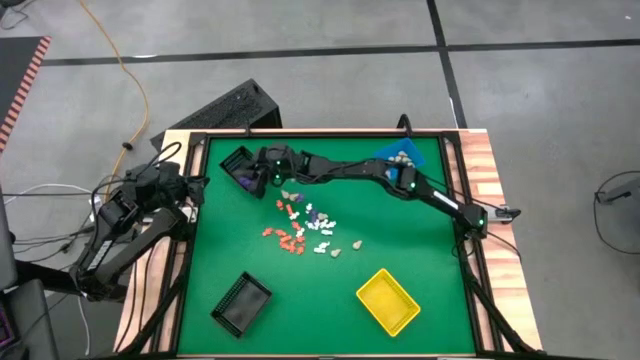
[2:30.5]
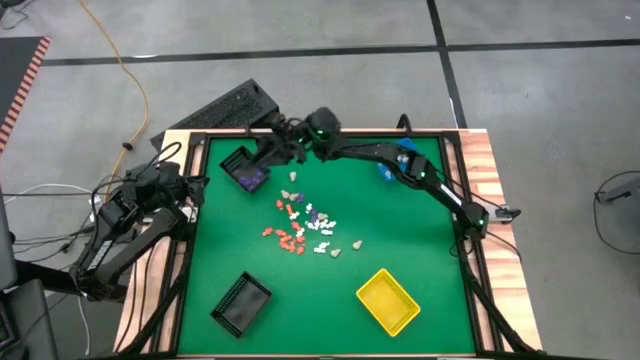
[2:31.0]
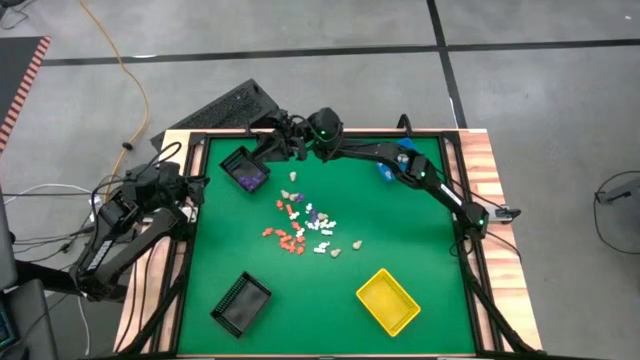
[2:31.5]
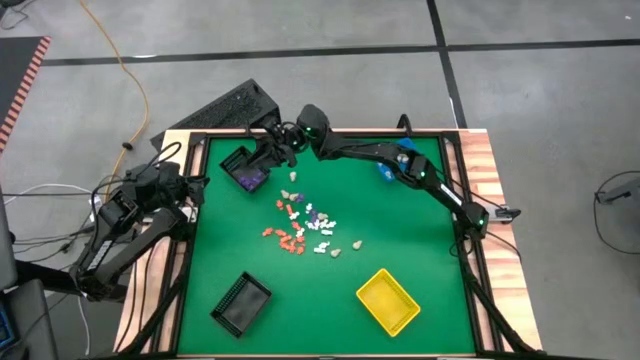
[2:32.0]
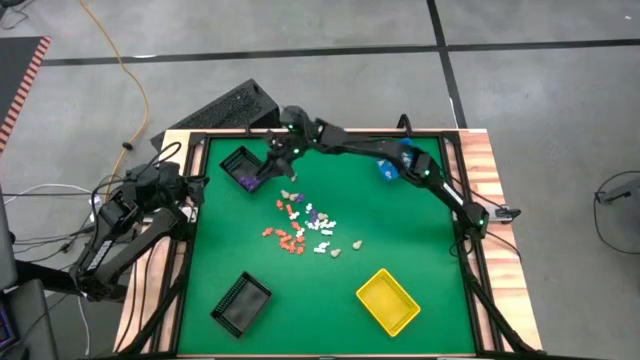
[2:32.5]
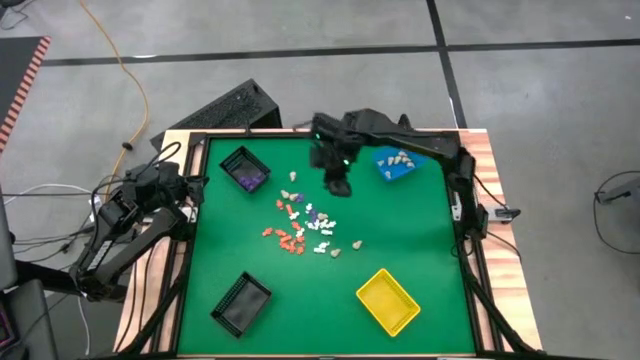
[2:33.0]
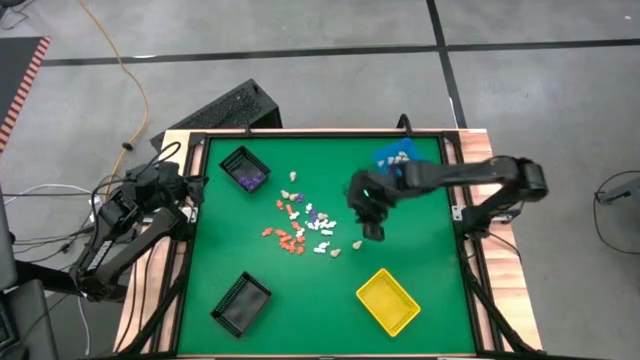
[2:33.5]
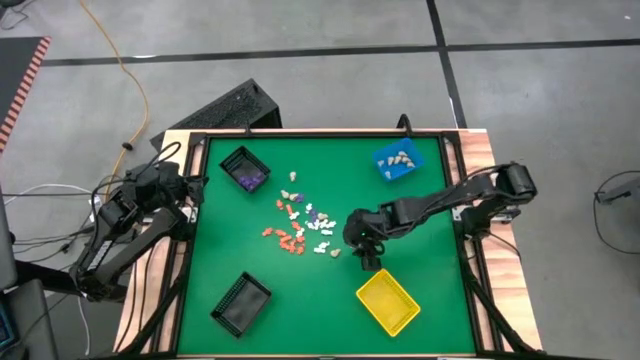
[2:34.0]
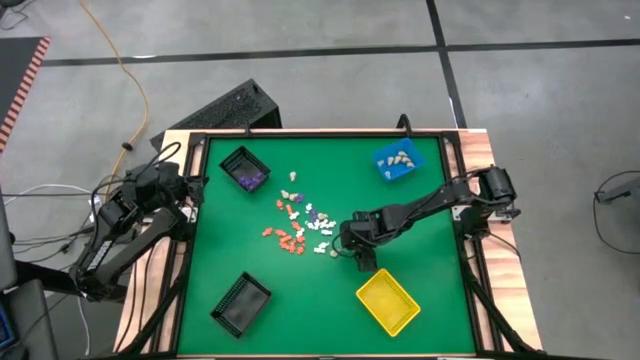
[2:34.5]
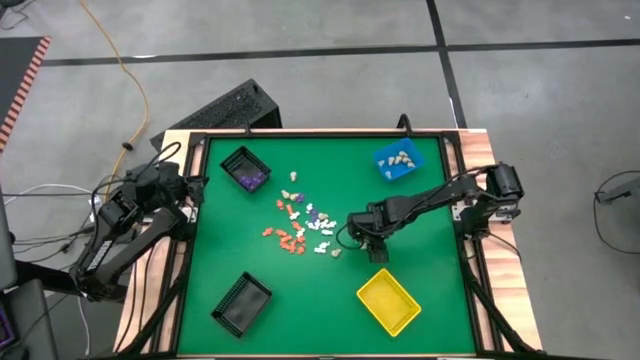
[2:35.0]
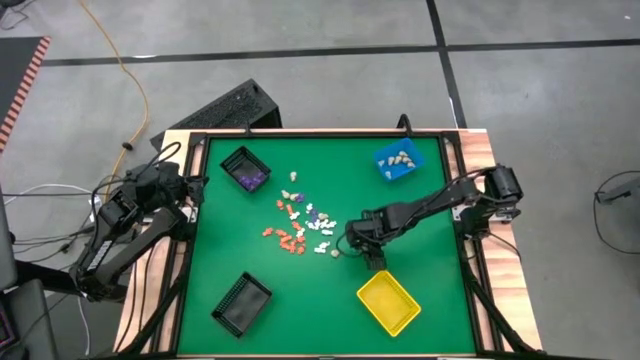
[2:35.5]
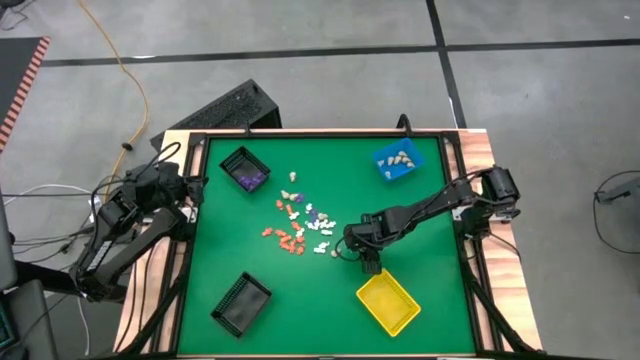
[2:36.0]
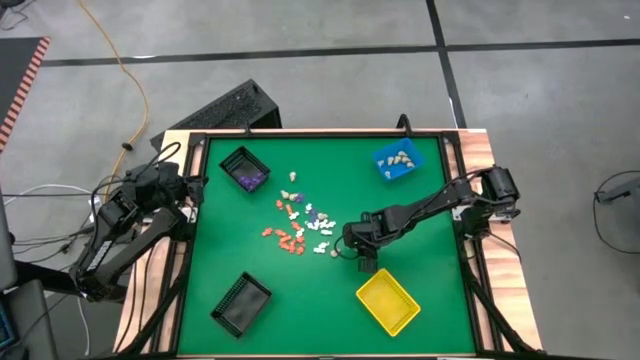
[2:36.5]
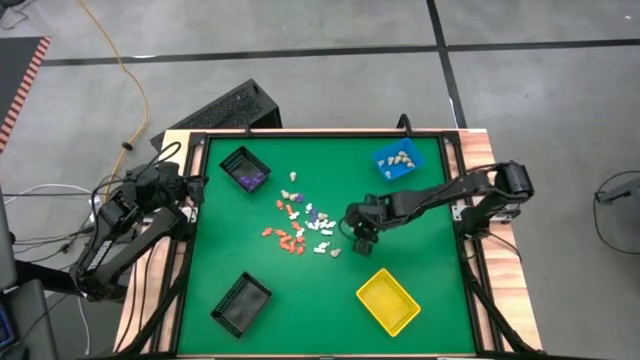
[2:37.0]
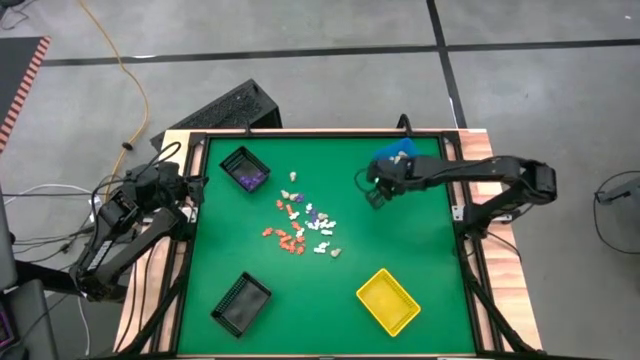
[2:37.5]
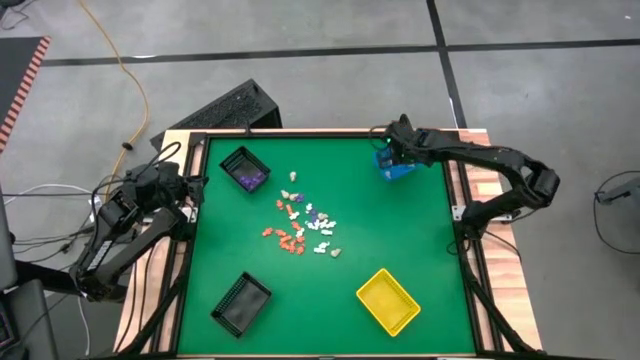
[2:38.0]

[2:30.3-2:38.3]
Task: Sort Halloween decoration
Put the skull toy into the blue basket

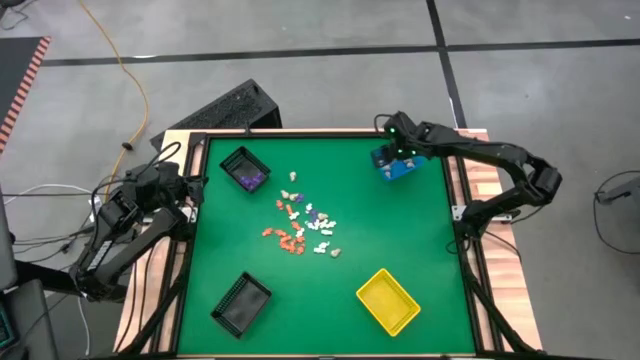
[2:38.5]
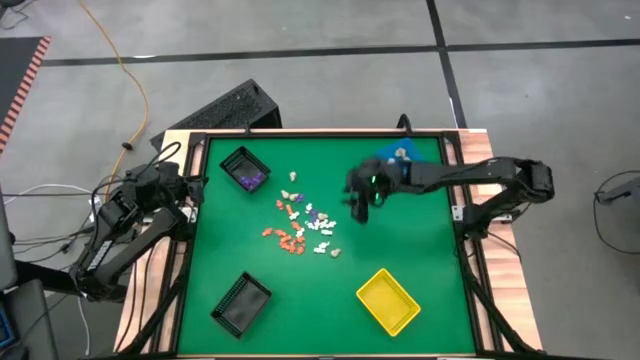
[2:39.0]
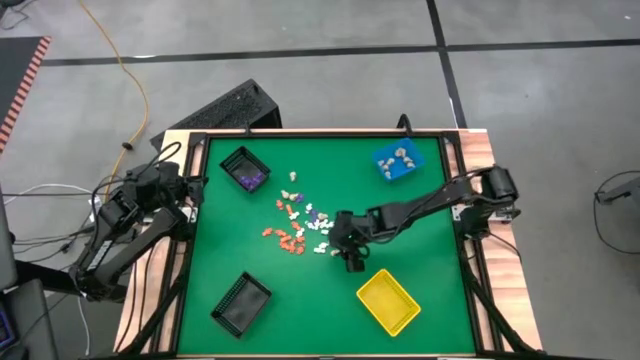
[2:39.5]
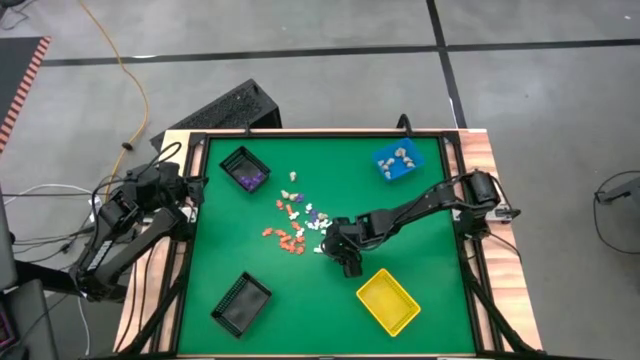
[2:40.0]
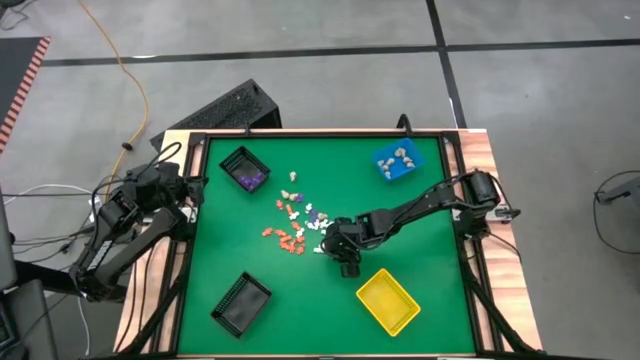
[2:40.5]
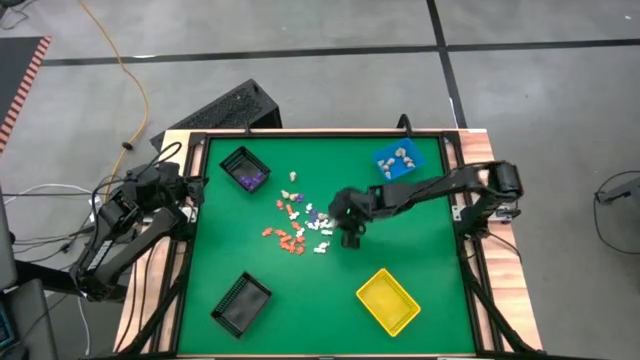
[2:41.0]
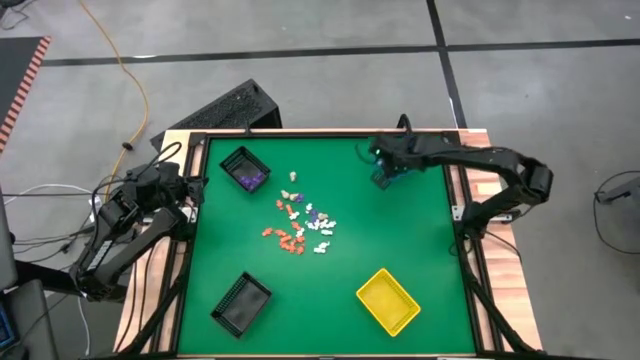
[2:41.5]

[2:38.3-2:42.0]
Put the skull toy into the blue basket

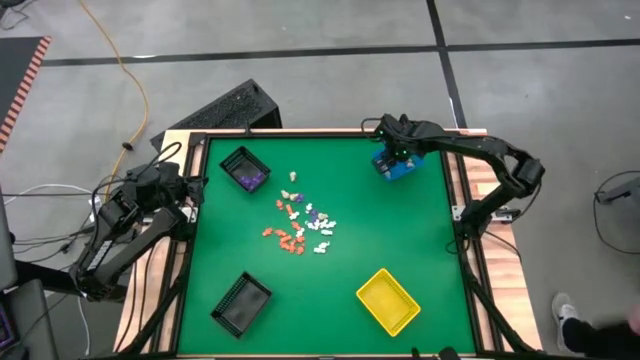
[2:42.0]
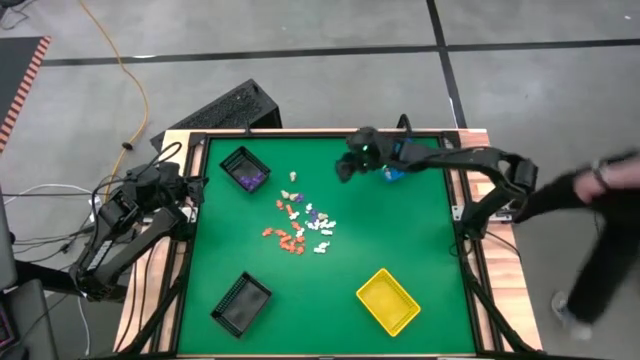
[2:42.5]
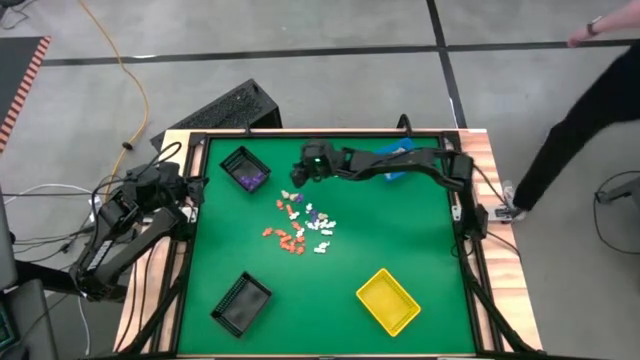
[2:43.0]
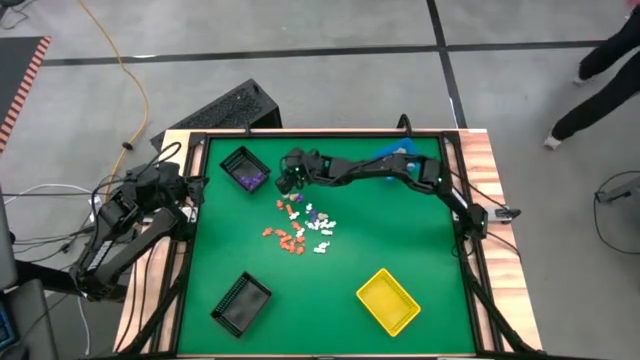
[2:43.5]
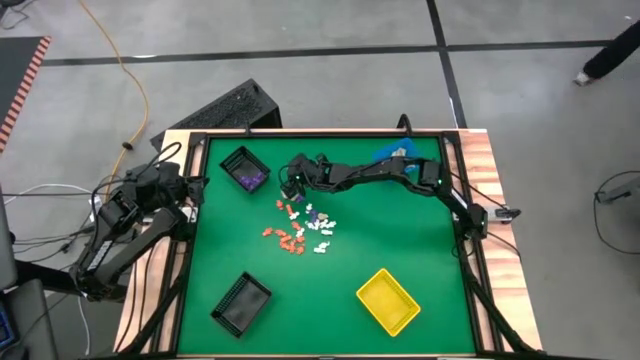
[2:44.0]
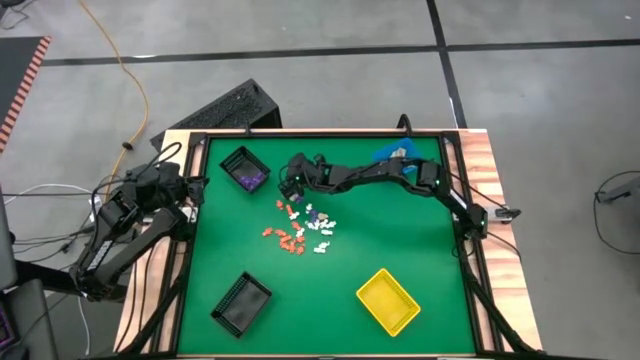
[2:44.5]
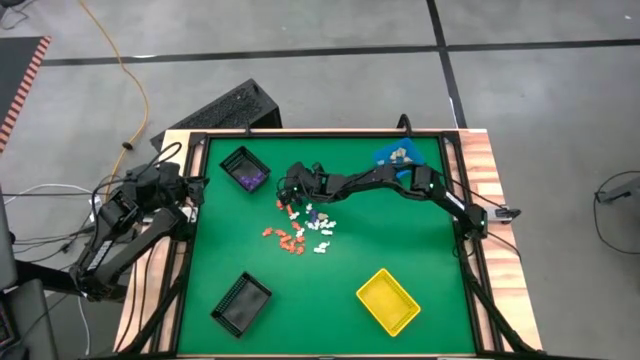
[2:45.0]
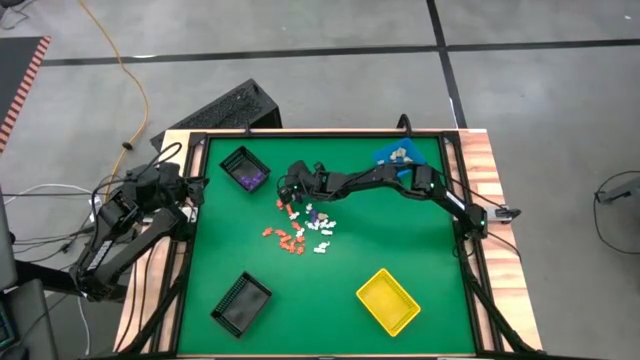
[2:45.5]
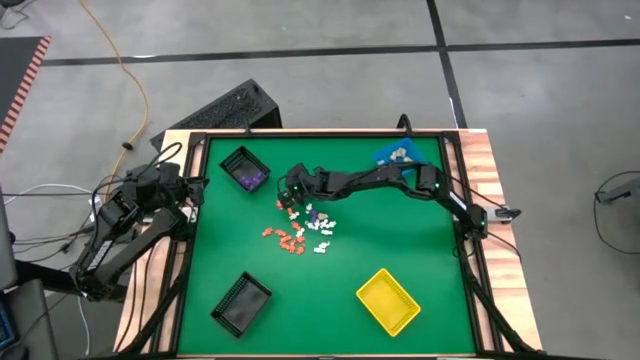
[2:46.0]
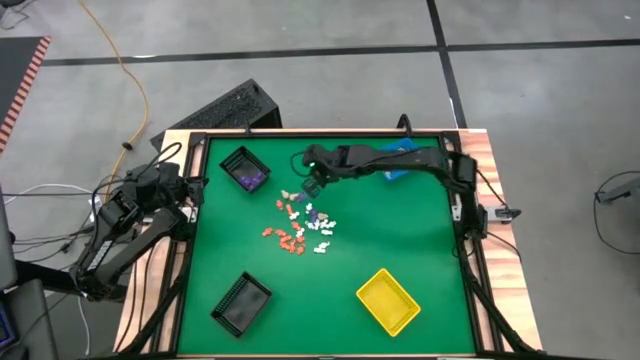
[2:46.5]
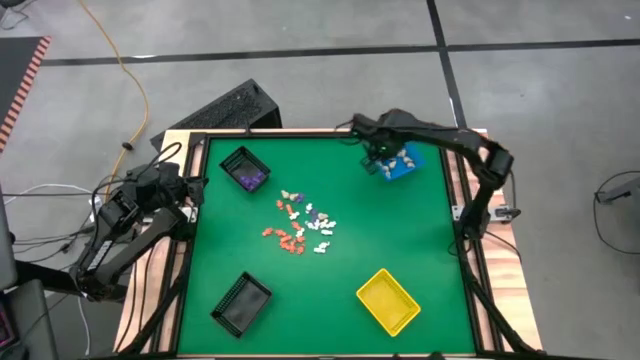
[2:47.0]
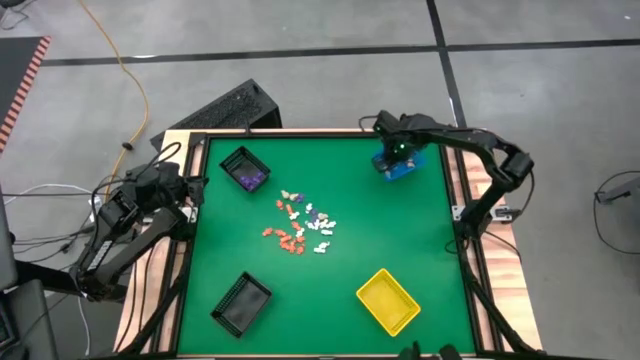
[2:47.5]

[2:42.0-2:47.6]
Put the skull toy into the blue basket

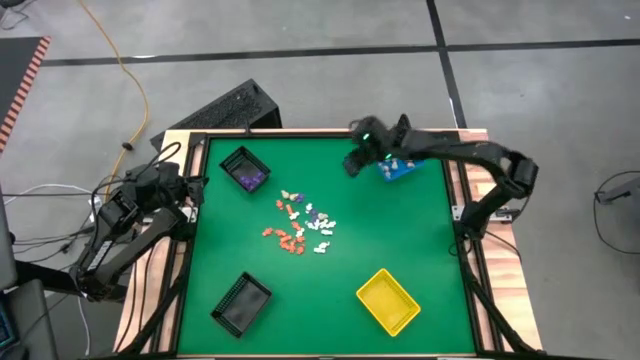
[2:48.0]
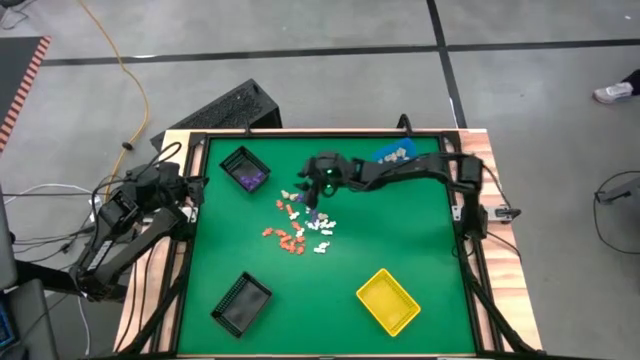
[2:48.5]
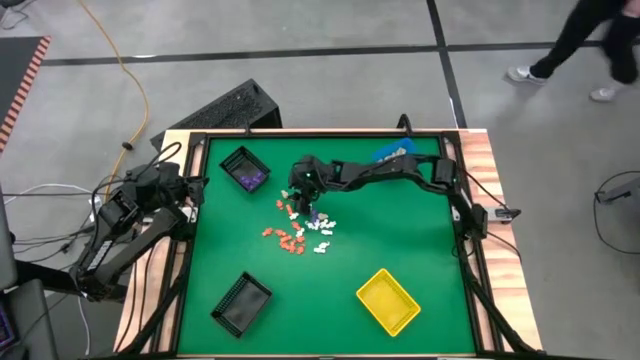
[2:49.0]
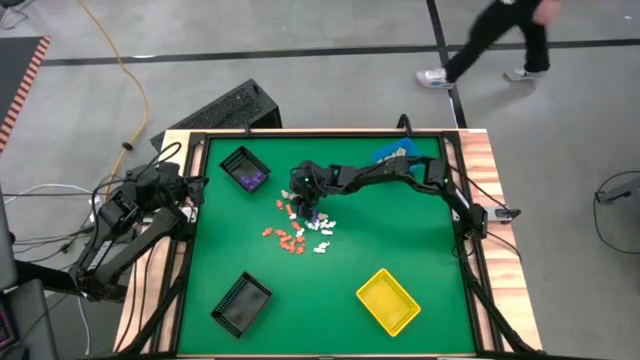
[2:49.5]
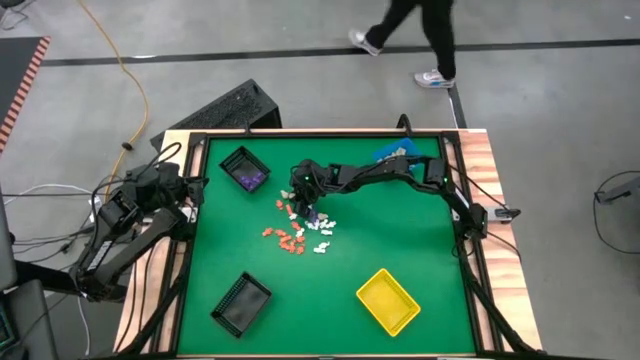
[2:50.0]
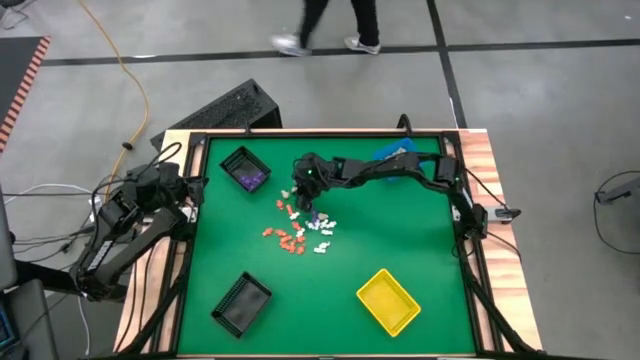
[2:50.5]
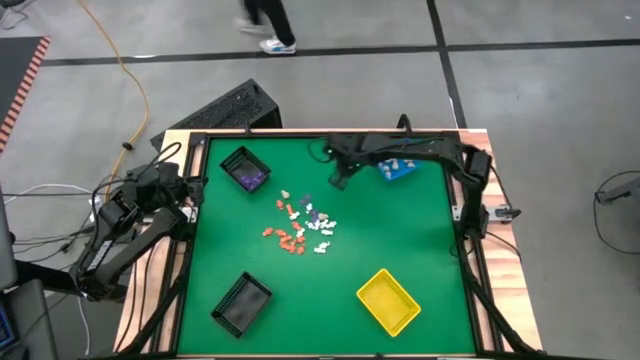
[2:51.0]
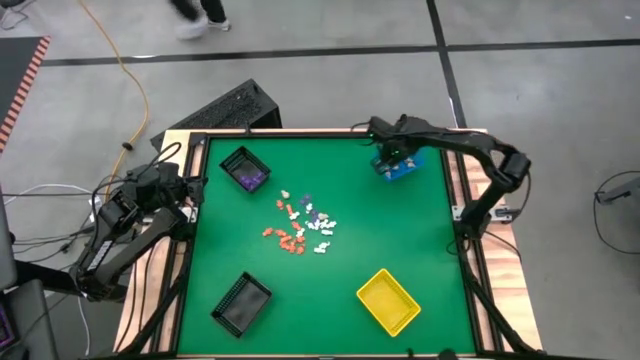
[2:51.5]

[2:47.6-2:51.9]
Put the skull toy into the blue basket

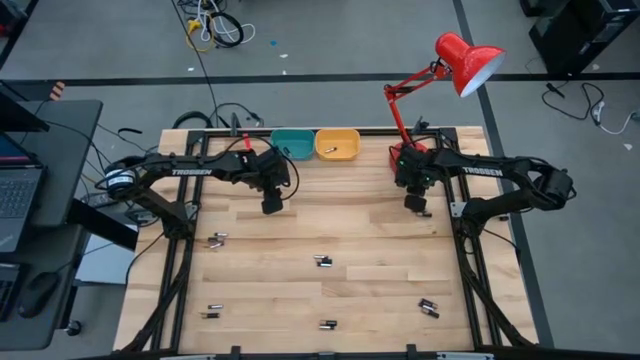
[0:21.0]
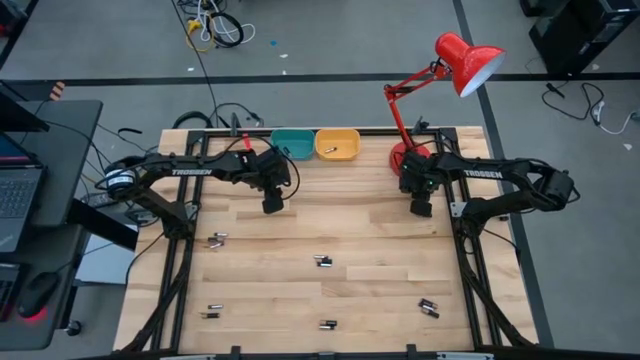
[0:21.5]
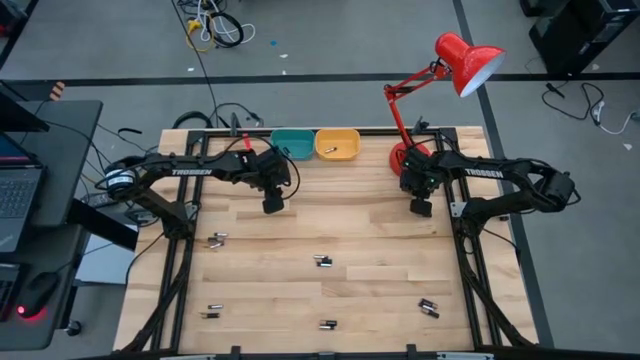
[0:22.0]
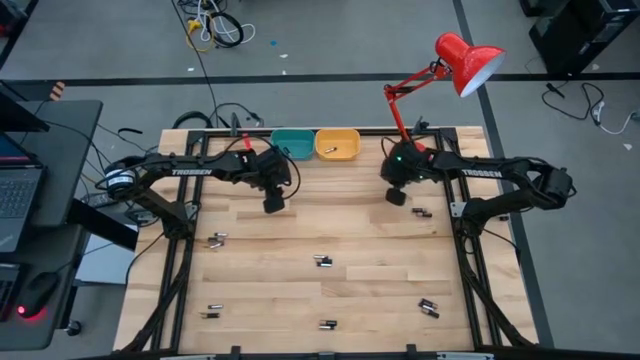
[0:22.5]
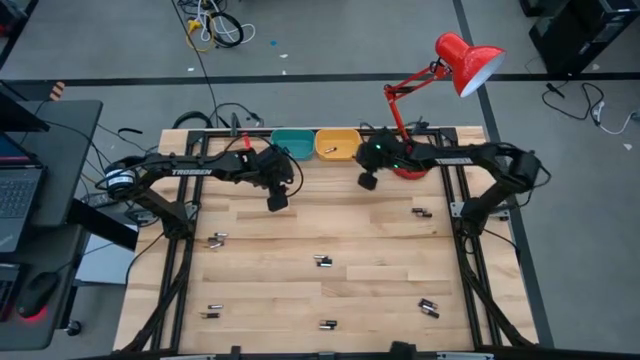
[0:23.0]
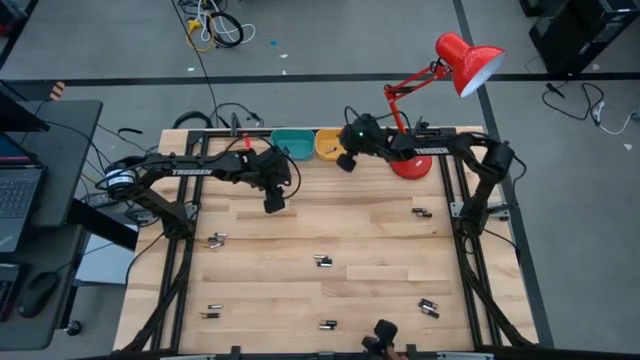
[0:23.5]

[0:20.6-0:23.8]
Task: Sort batteries
Put the white battery into the yellow bin
